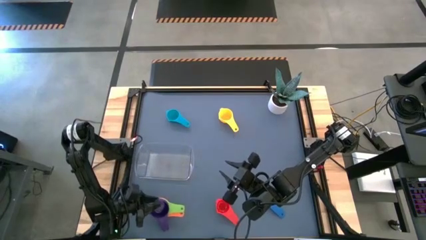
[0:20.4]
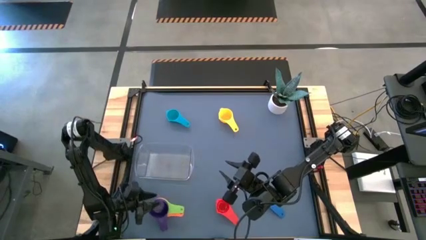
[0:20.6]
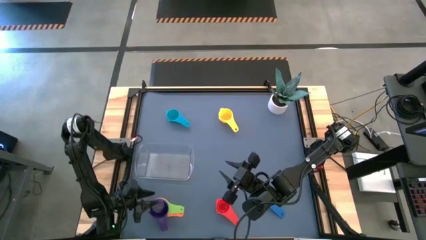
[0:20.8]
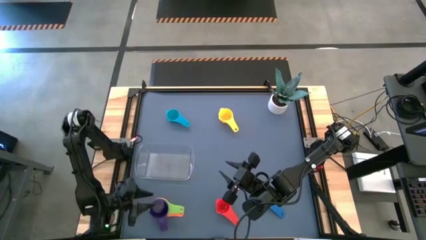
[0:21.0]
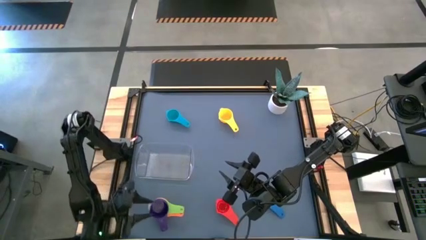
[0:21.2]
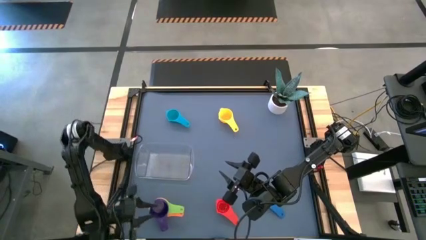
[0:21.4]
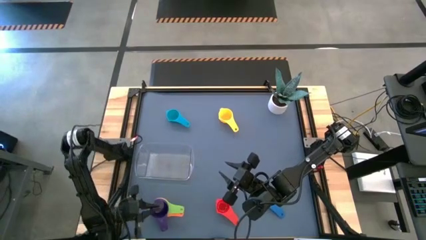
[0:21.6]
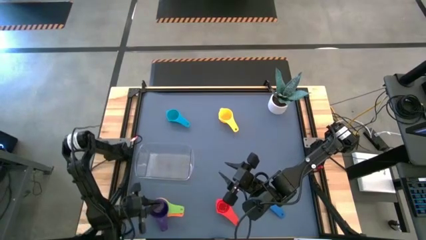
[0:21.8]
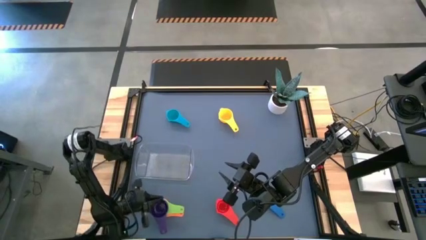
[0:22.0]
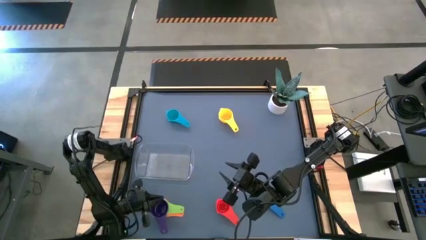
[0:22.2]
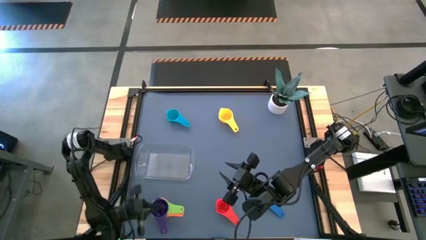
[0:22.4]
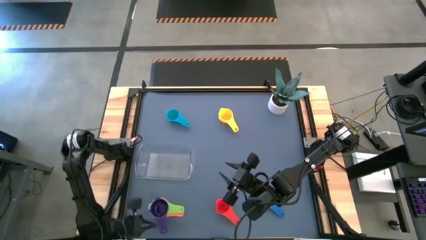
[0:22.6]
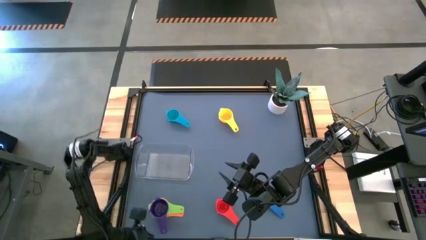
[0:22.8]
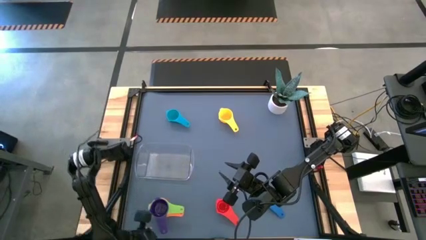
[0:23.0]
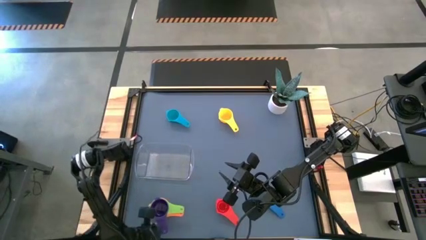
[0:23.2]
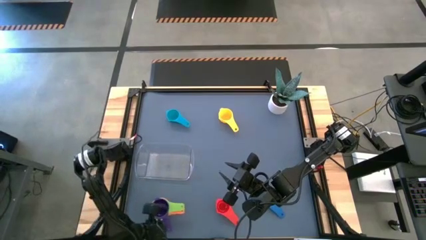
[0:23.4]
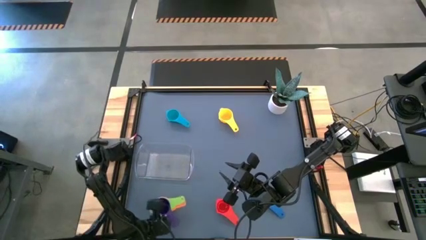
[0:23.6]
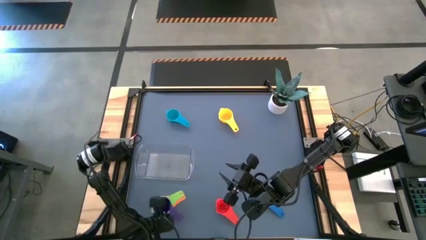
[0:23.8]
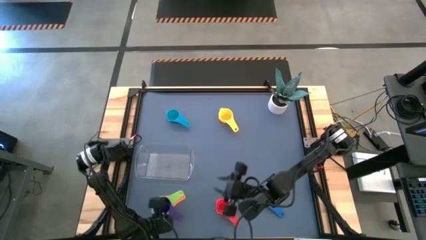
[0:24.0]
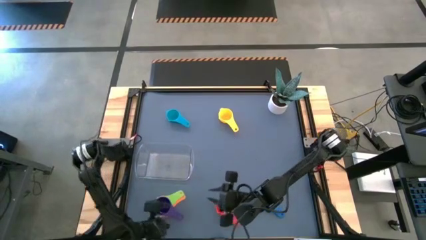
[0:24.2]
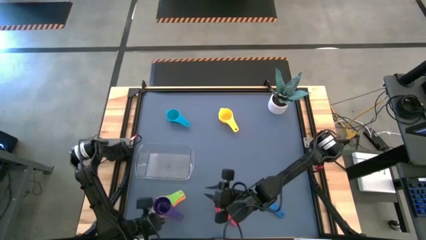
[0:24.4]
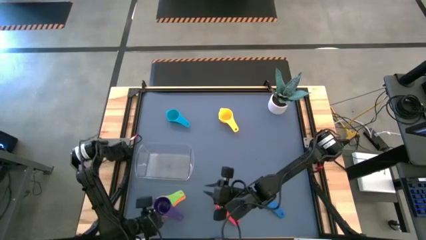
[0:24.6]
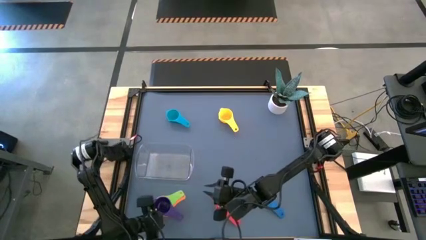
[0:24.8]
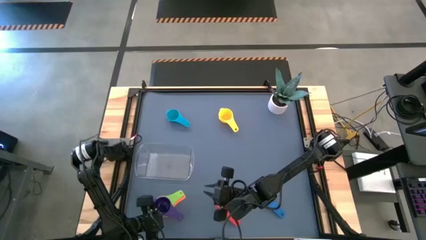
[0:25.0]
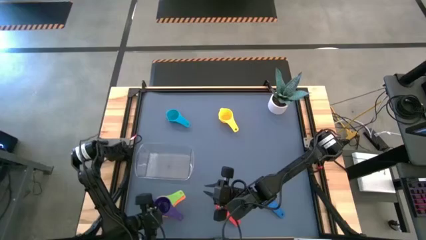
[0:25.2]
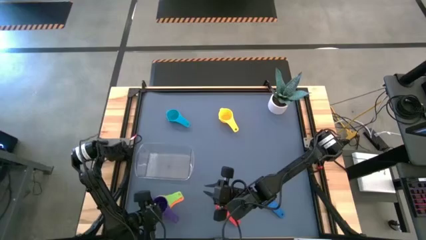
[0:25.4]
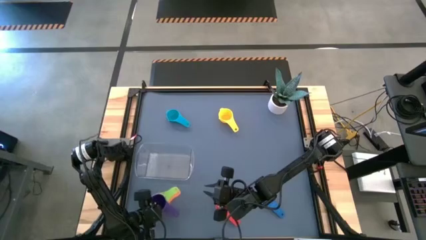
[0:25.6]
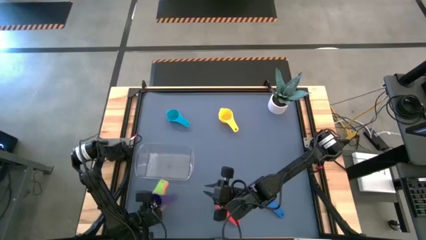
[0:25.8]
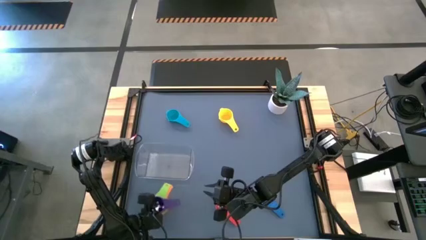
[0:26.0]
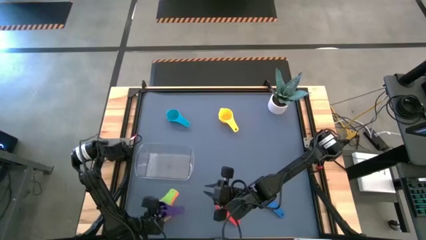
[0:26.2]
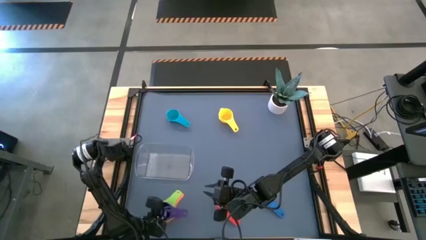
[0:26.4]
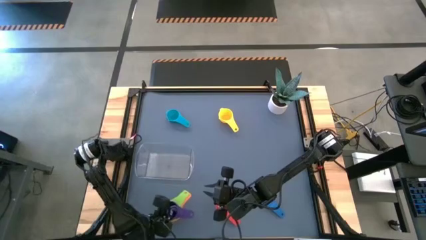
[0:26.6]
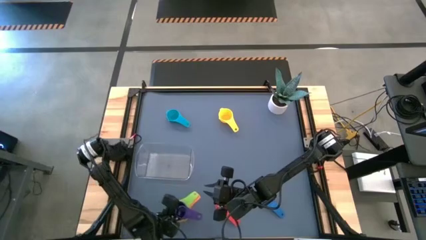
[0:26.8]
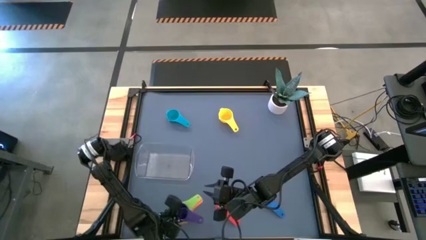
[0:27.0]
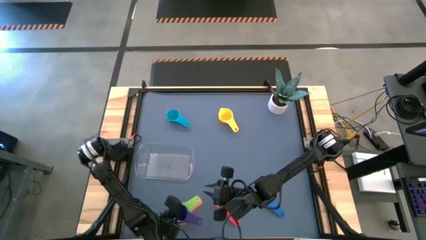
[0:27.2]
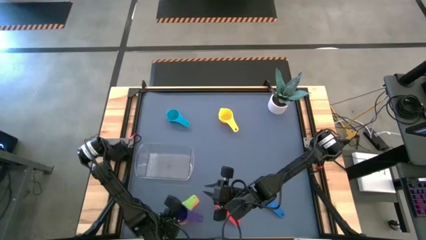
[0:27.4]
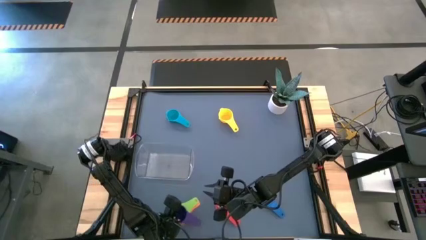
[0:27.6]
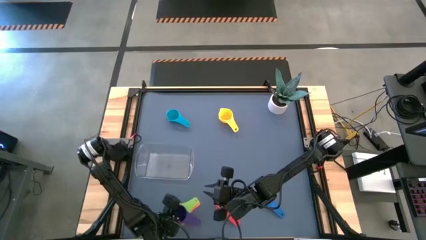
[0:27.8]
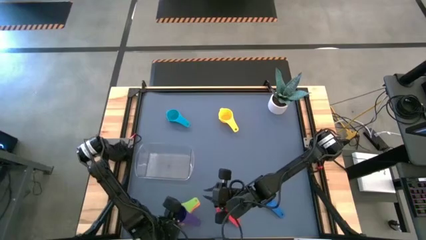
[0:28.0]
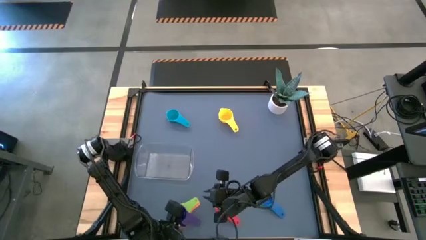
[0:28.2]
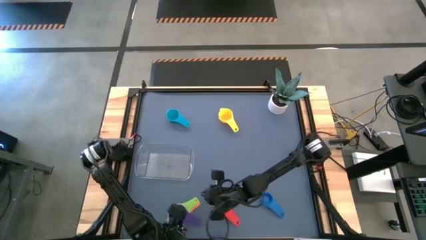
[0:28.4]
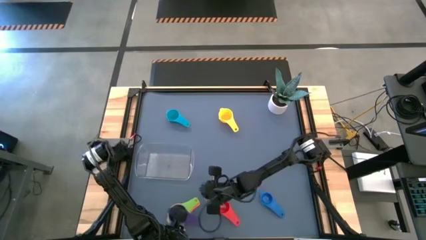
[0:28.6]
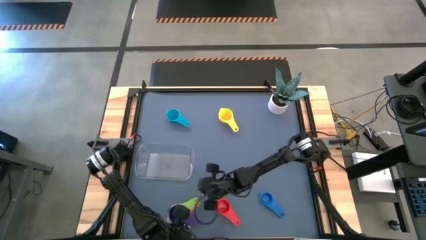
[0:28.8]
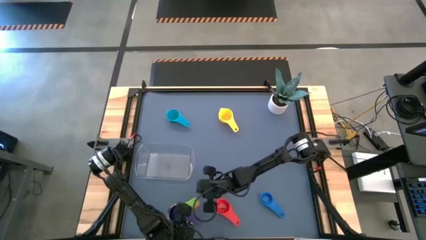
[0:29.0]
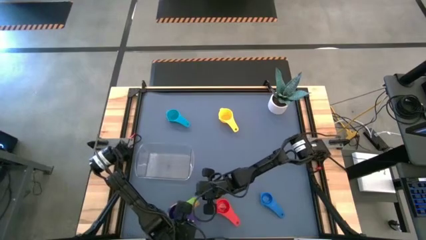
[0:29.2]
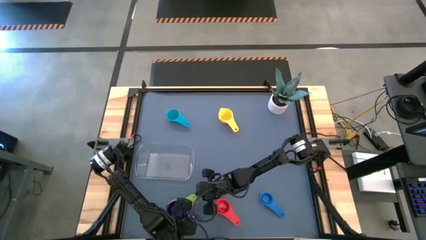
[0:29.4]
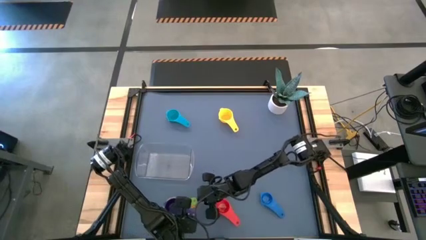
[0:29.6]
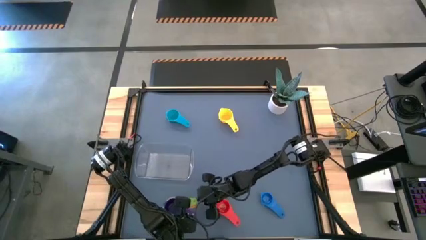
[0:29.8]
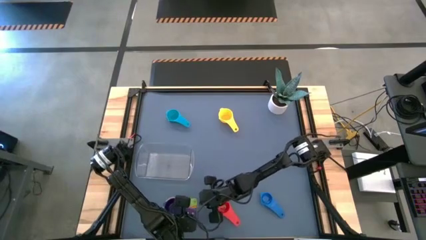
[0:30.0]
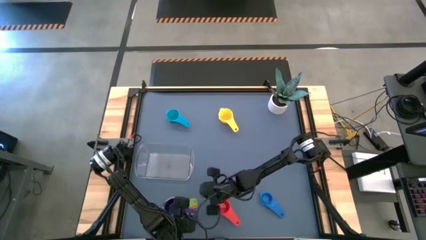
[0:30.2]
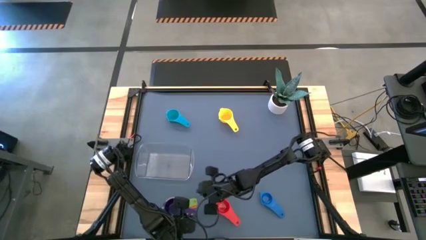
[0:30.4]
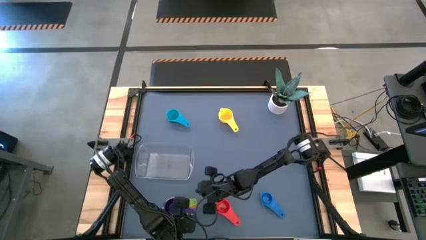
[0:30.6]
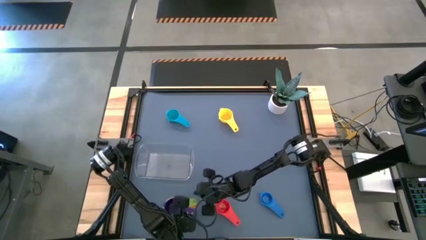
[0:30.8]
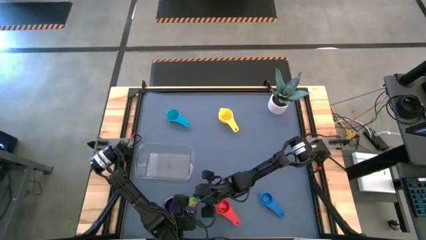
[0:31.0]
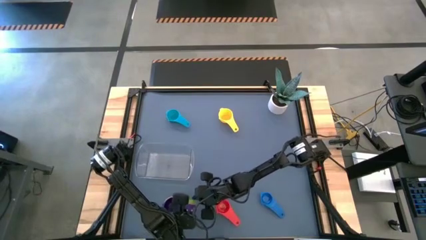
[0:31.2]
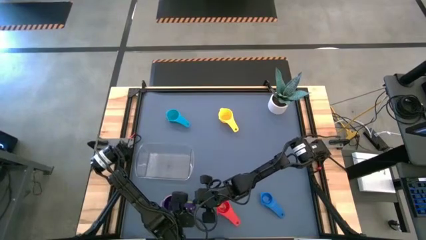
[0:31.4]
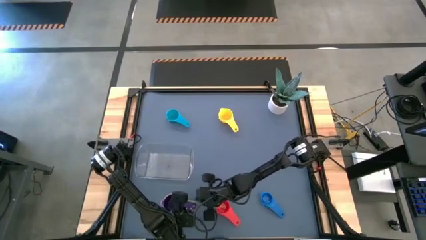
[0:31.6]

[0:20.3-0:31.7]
Task: Nest measuring cups in basket
Stack the purple measuring cup on top of the green measuring cup

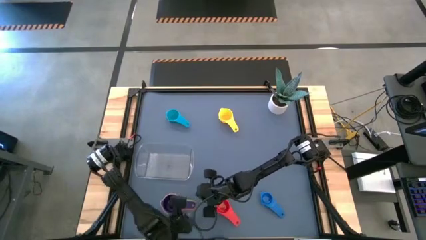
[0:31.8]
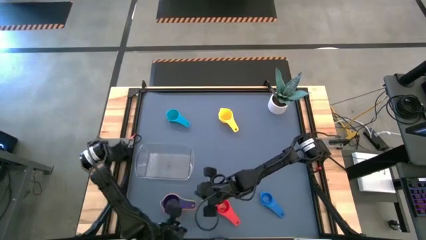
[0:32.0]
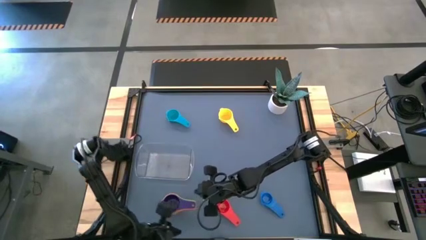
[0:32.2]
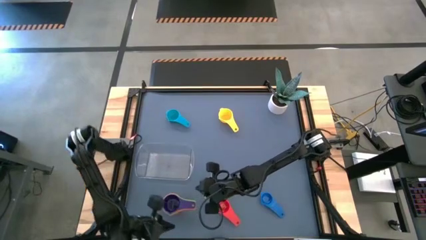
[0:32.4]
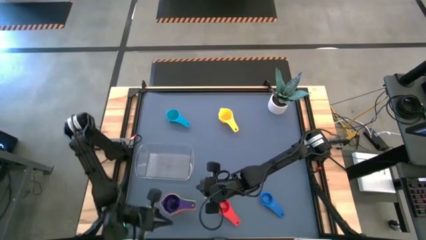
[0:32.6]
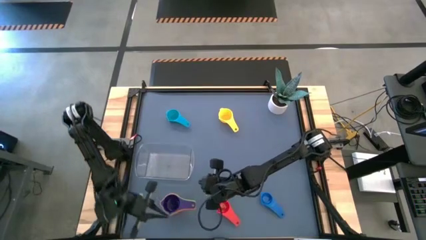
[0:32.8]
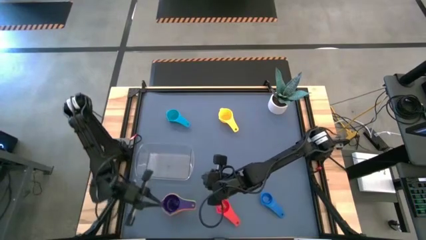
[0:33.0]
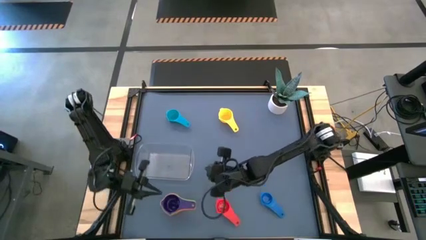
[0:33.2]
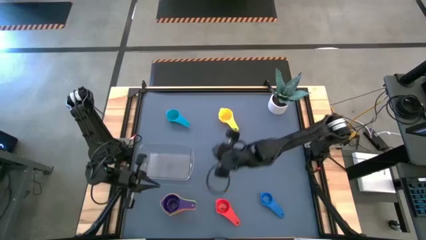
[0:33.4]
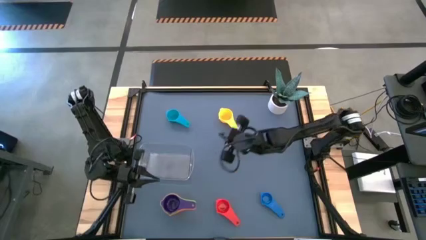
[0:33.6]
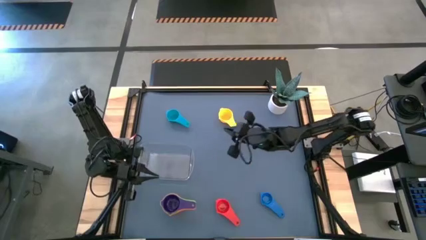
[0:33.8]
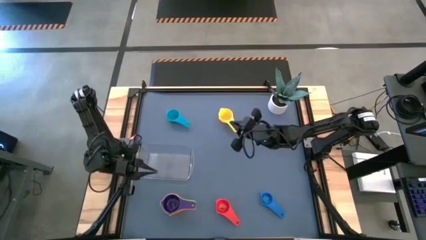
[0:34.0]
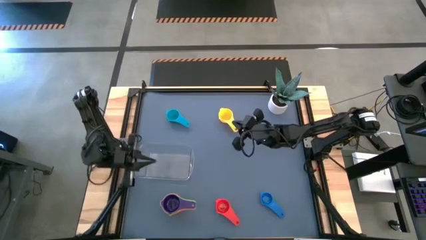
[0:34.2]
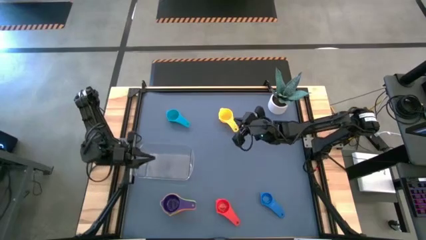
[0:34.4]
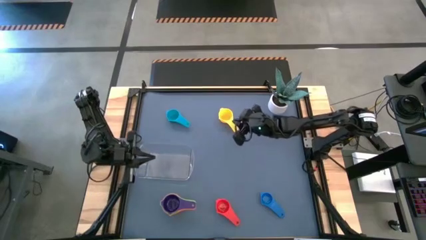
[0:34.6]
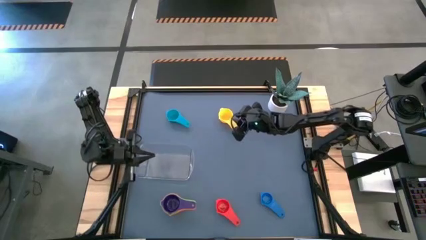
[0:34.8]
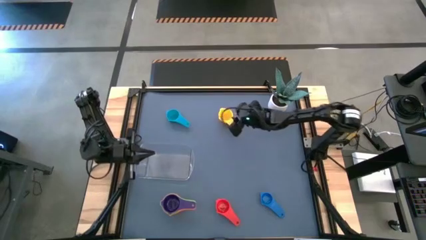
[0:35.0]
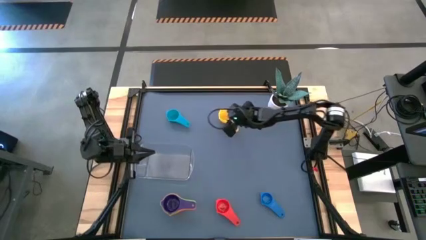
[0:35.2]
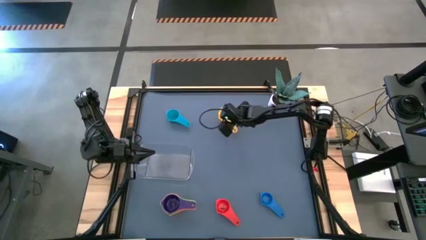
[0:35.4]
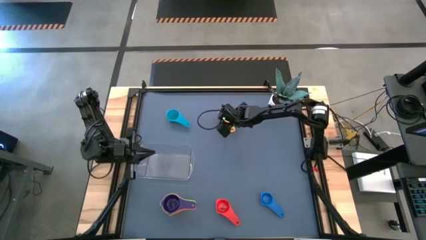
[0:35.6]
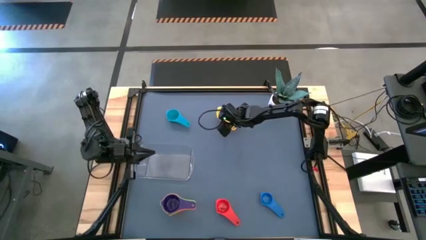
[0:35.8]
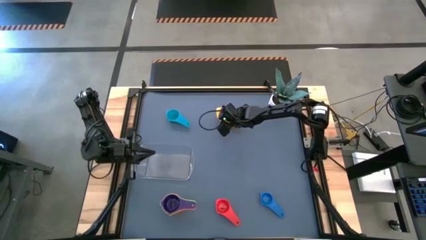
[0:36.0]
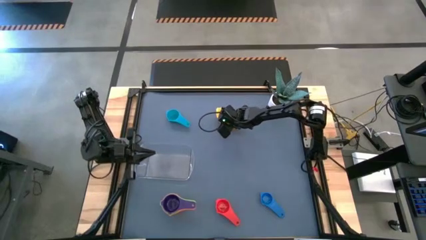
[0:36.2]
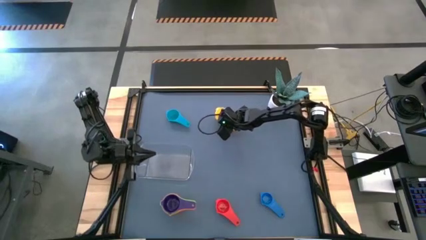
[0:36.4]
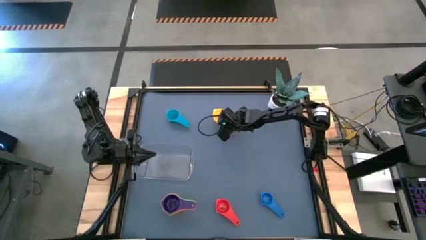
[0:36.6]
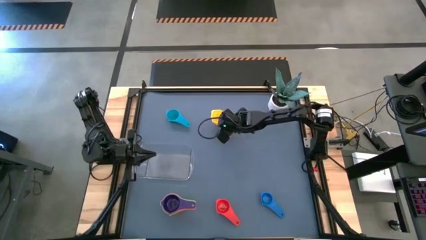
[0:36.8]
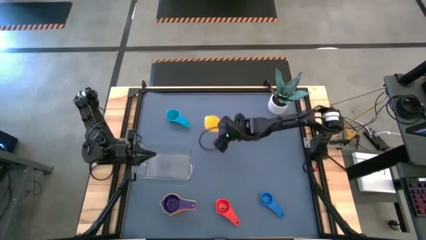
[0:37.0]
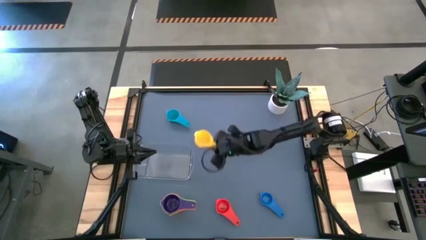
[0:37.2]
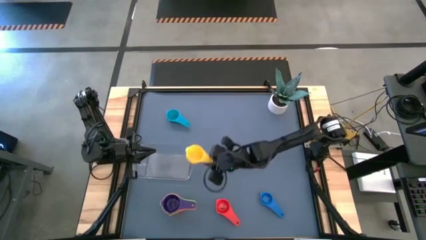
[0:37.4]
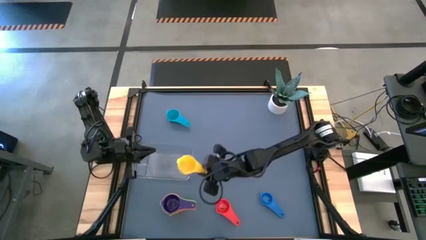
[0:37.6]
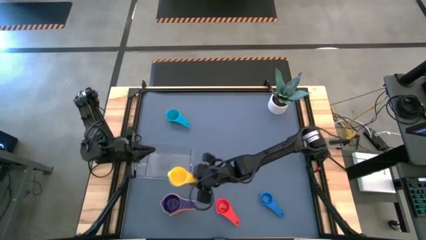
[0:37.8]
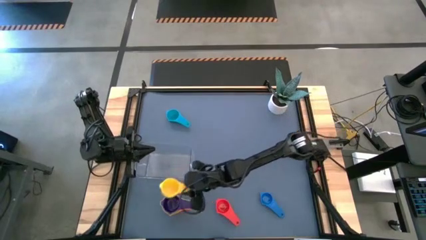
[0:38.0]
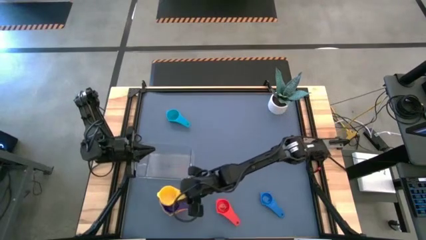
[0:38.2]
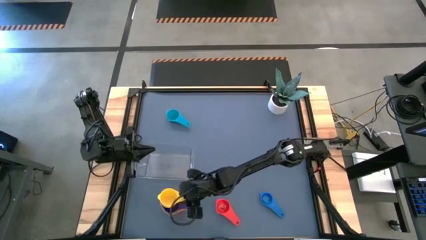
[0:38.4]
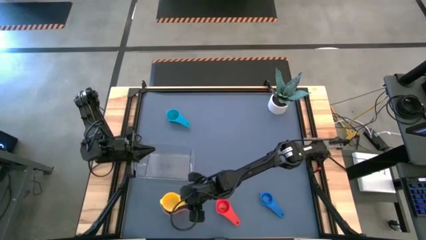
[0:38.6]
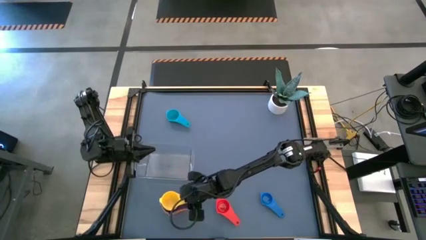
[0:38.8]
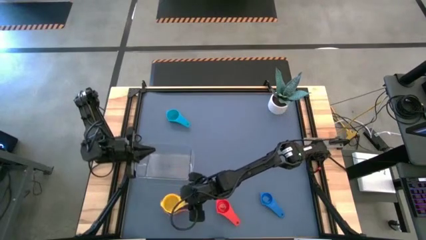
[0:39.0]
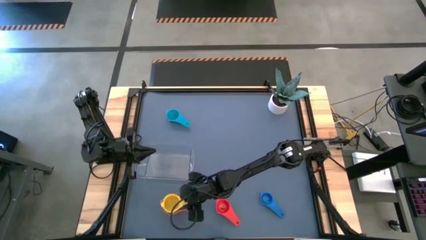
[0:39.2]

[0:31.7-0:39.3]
Stack the yellow measuring cup on top of the purple measuring cup
